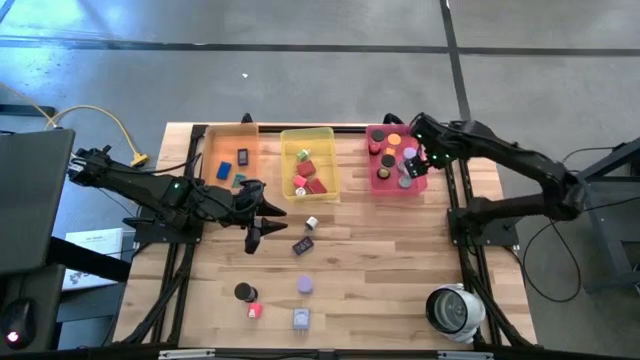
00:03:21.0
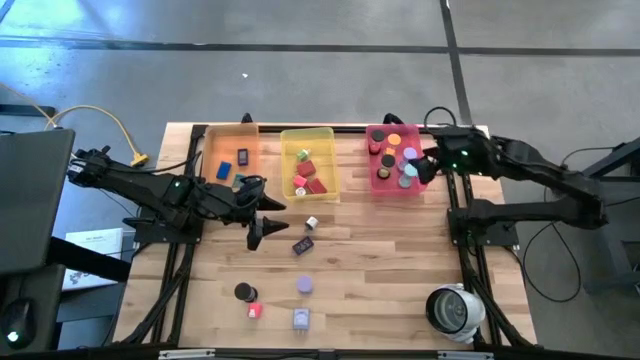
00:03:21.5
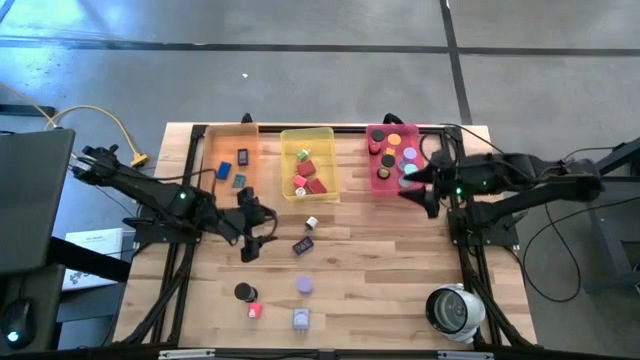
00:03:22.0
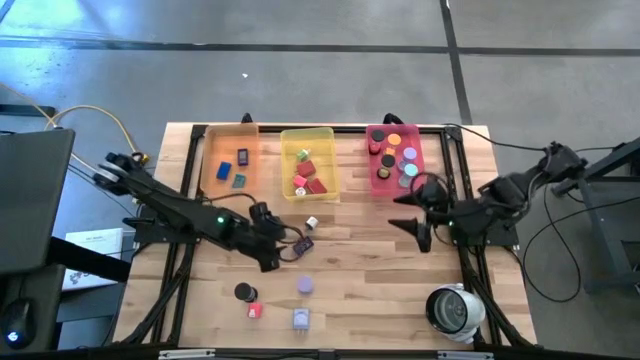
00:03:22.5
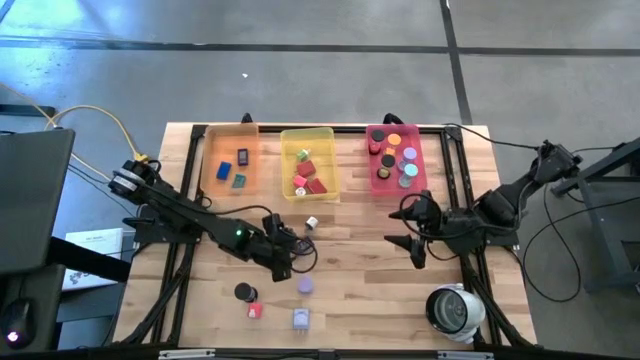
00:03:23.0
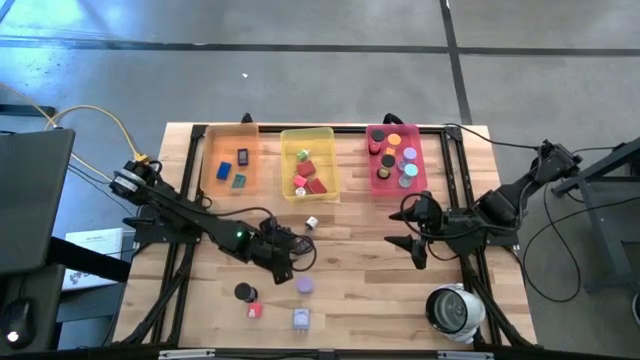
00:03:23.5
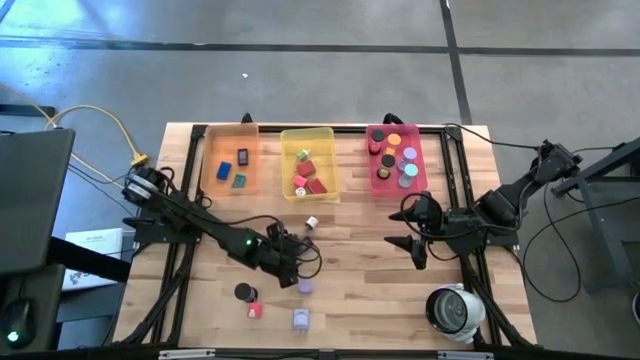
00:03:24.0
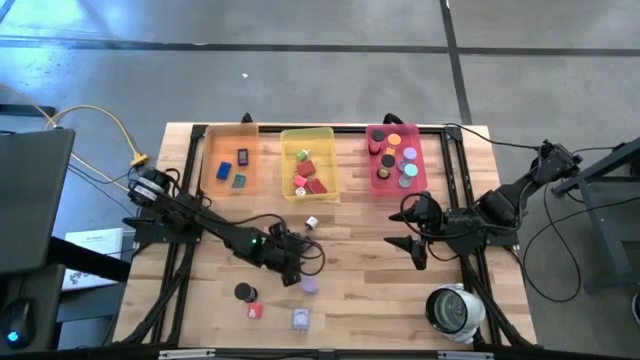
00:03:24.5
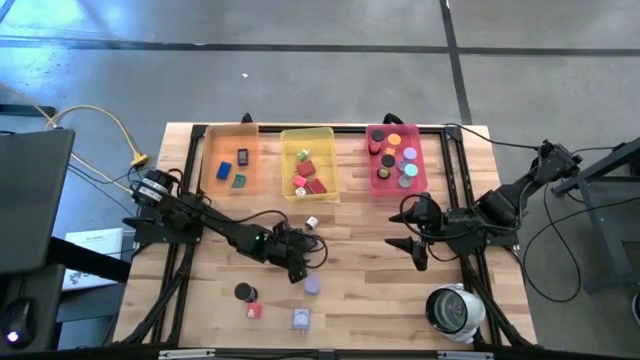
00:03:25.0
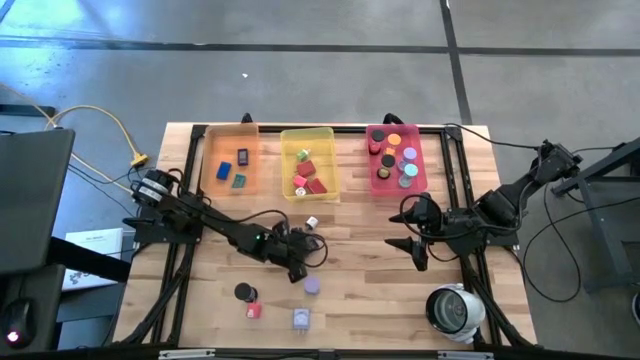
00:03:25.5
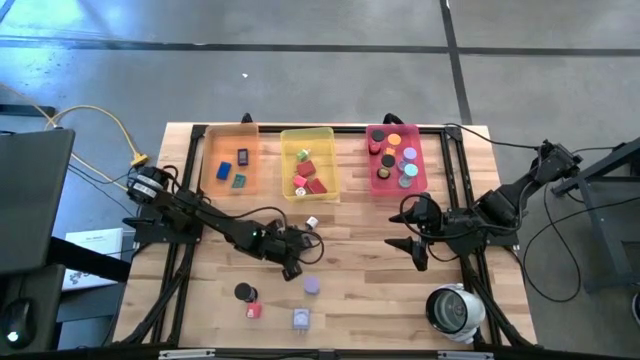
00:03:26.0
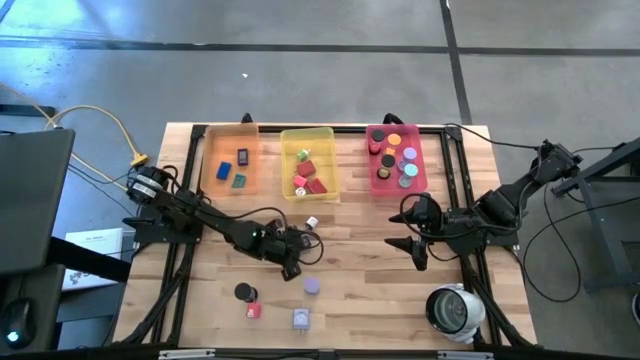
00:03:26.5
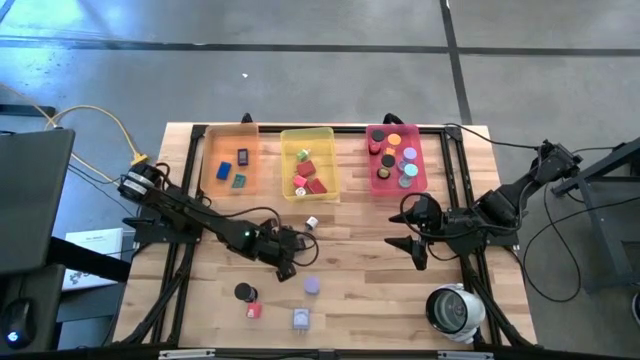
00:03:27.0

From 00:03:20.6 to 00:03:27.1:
Task: Pick & Place Office items
Put the blue digital clock into the orange bin

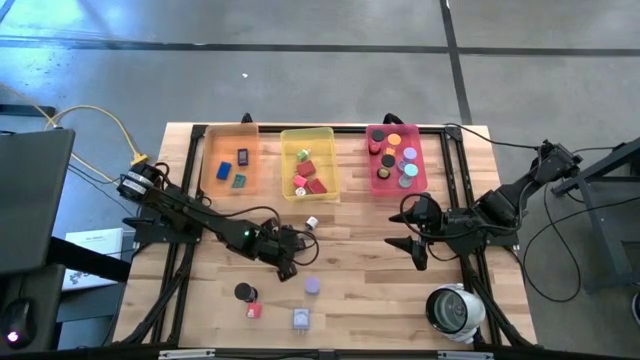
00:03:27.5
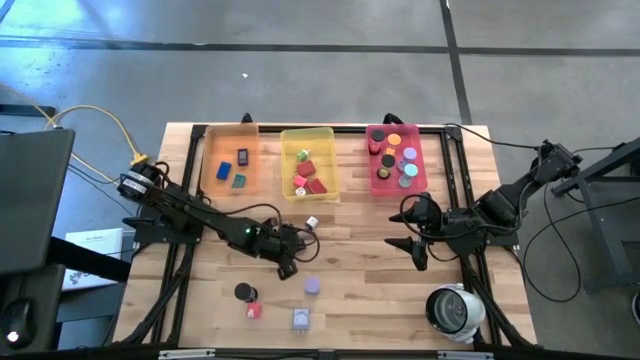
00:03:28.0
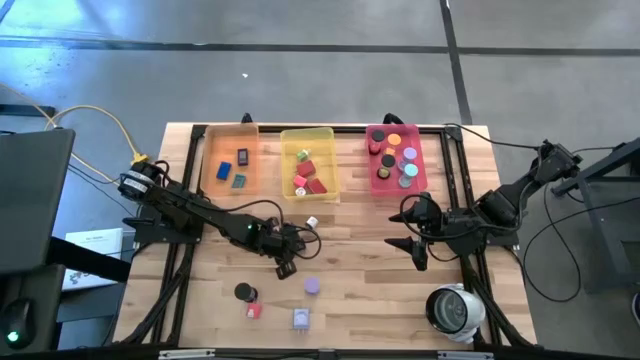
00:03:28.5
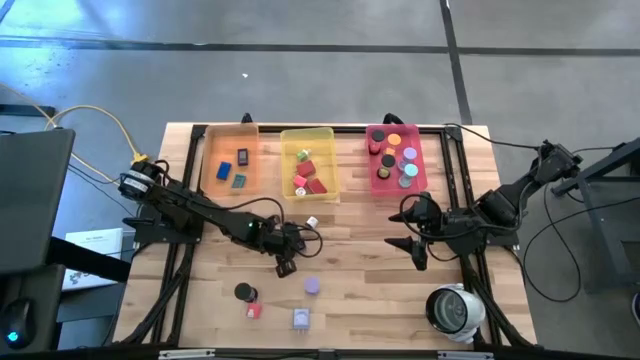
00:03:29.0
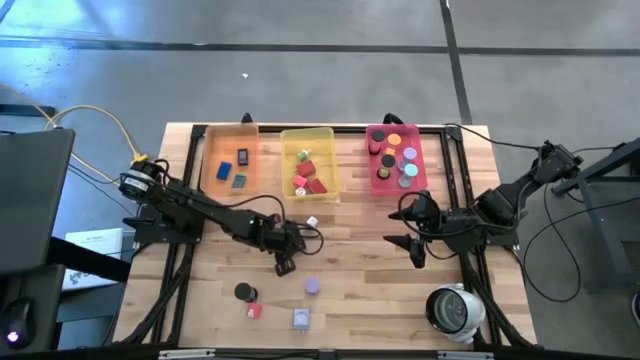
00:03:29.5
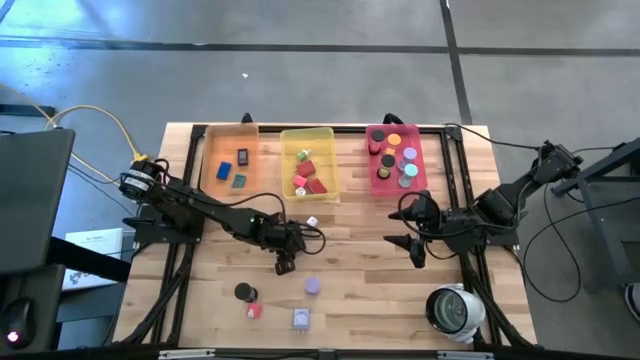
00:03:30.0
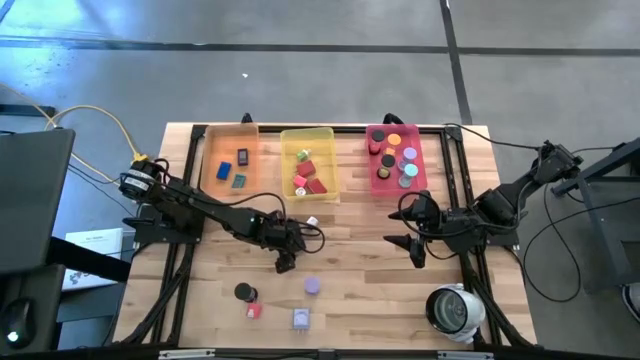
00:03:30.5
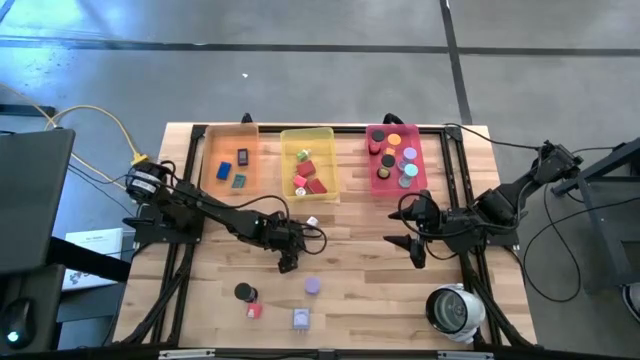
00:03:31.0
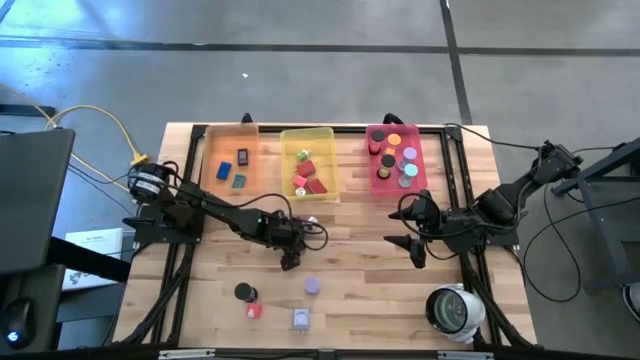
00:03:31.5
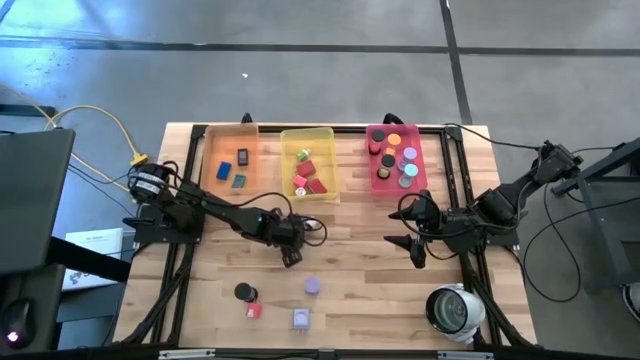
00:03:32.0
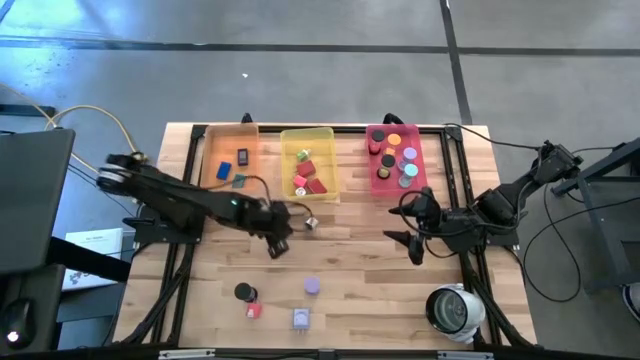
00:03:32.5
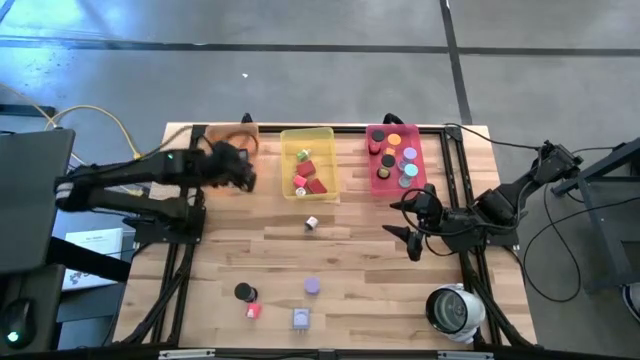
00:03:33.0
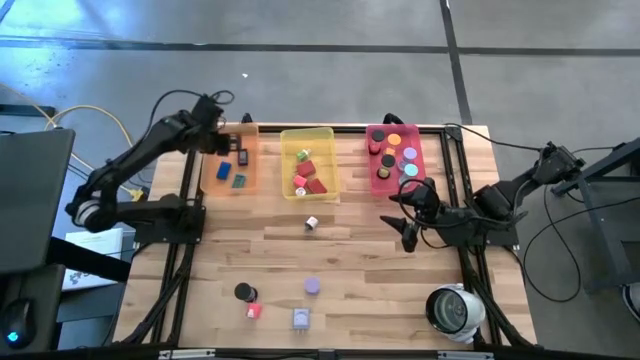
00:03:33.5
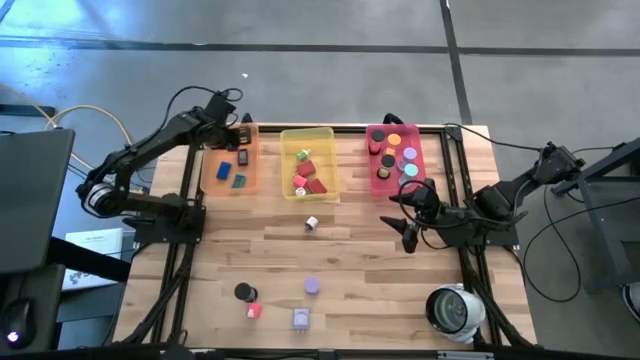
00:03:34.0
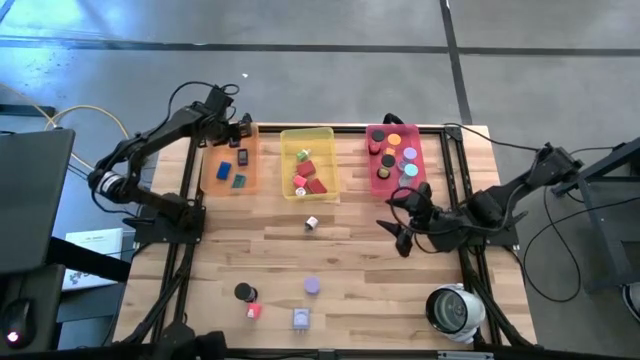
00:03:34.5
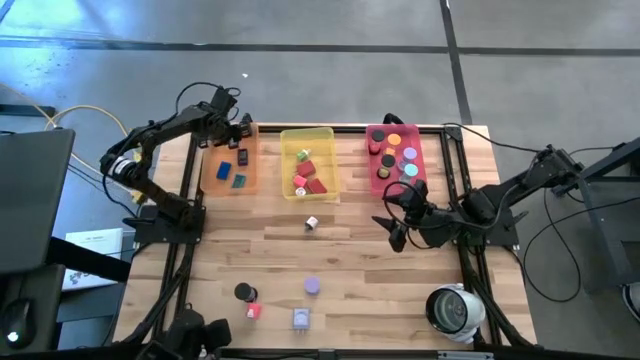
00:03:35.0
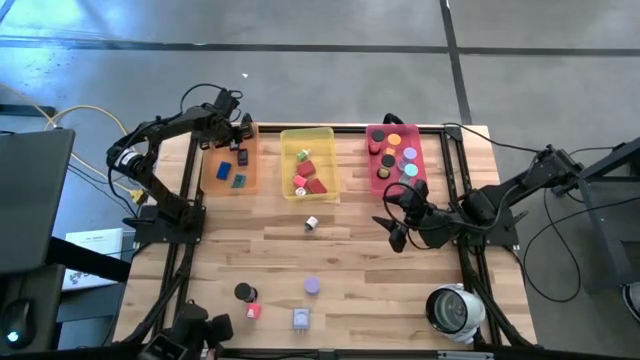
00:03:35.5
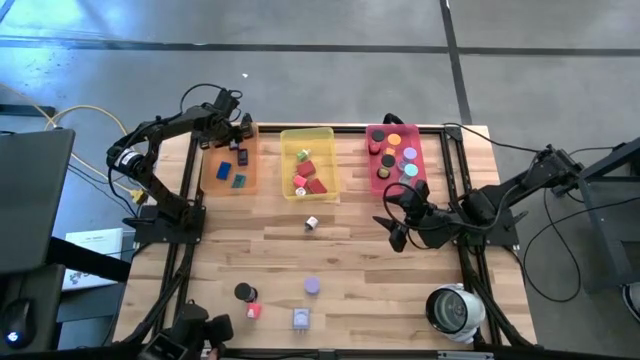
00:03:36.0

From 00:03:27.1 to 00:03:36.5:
Put the blue digital clock into the orange bin
